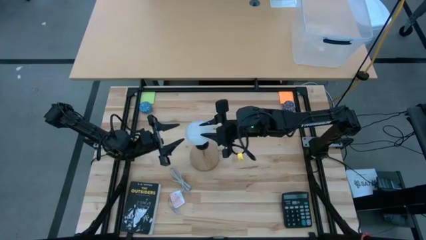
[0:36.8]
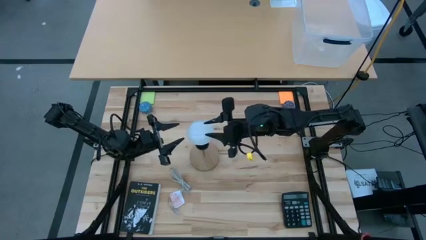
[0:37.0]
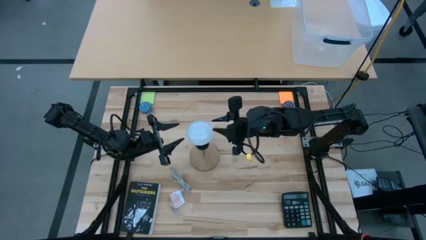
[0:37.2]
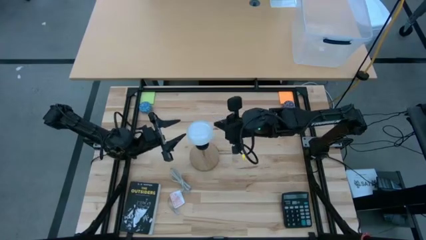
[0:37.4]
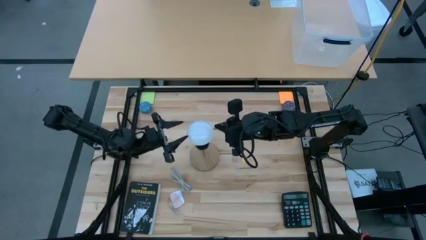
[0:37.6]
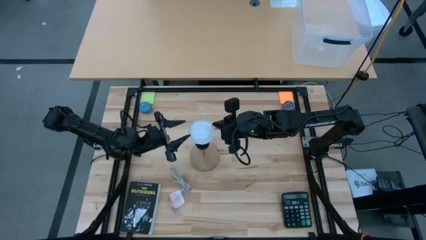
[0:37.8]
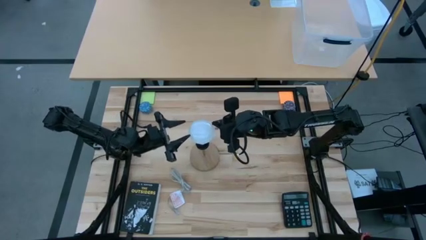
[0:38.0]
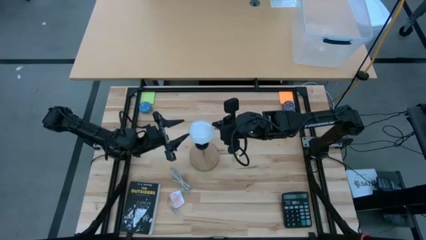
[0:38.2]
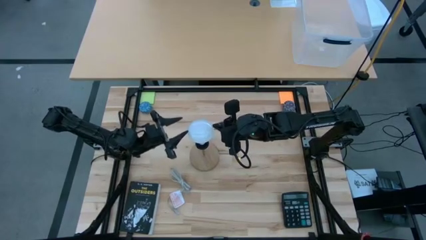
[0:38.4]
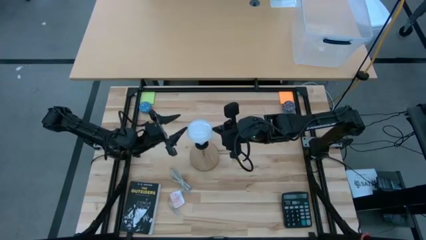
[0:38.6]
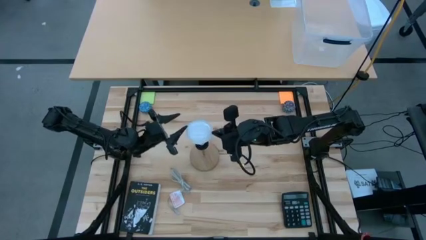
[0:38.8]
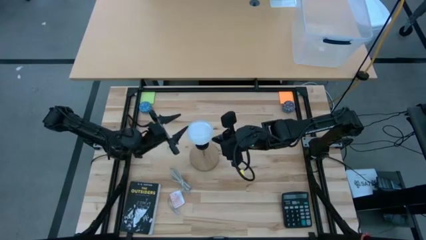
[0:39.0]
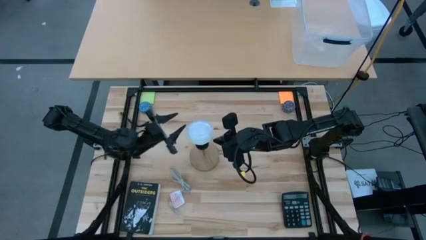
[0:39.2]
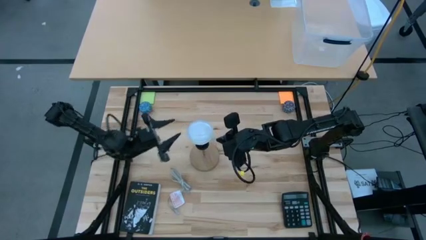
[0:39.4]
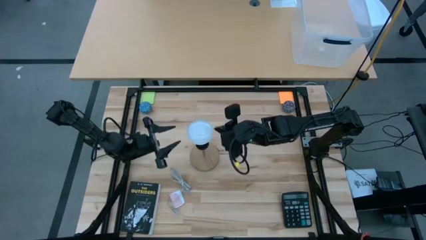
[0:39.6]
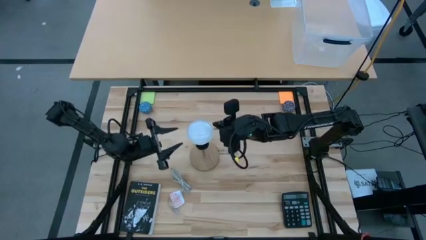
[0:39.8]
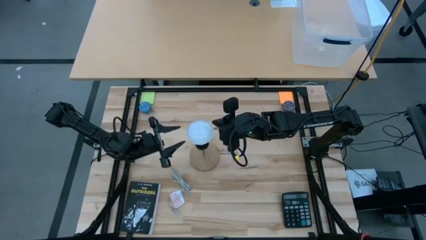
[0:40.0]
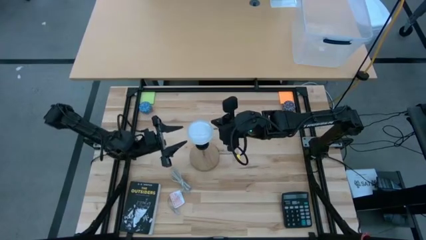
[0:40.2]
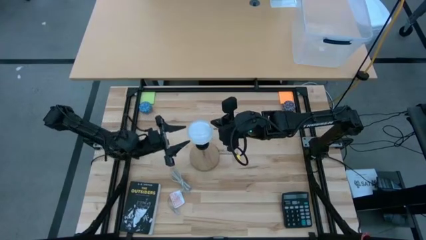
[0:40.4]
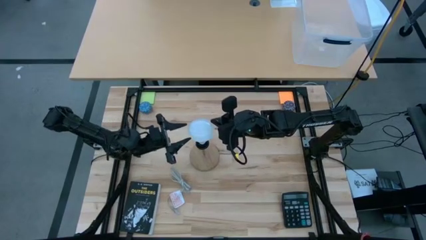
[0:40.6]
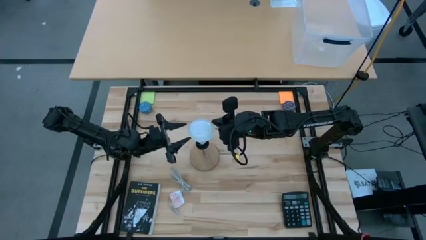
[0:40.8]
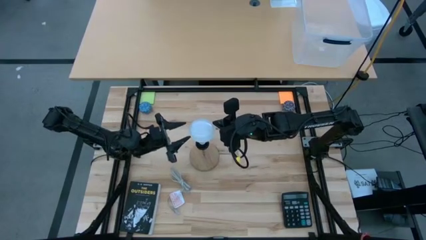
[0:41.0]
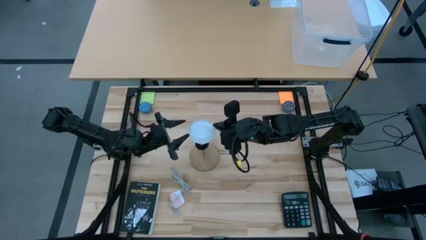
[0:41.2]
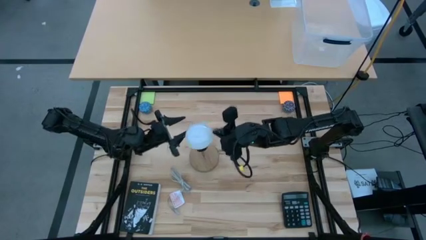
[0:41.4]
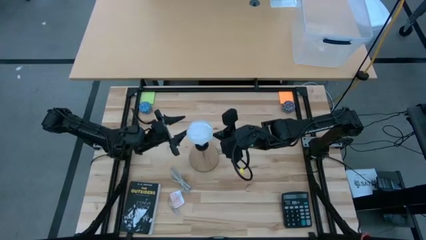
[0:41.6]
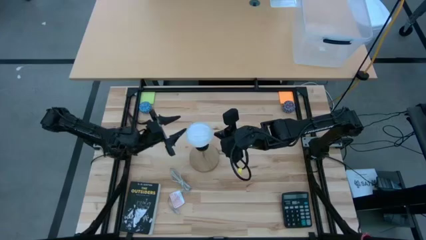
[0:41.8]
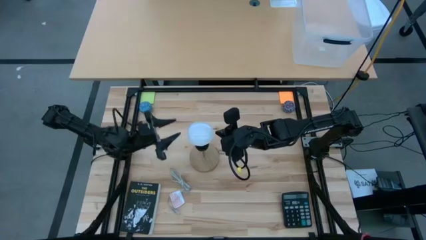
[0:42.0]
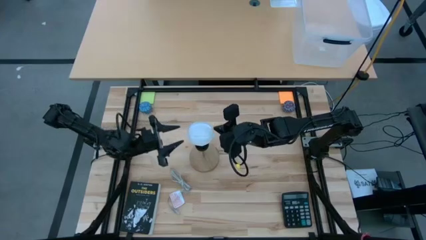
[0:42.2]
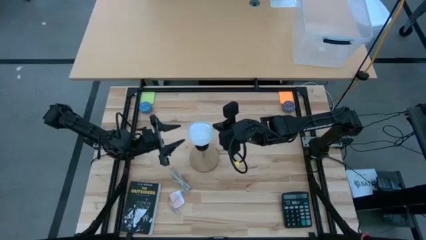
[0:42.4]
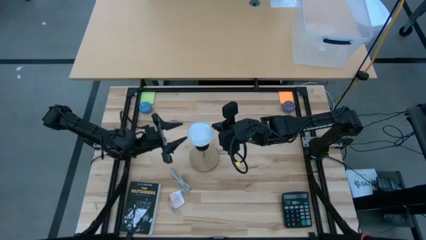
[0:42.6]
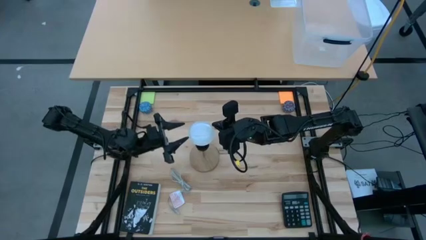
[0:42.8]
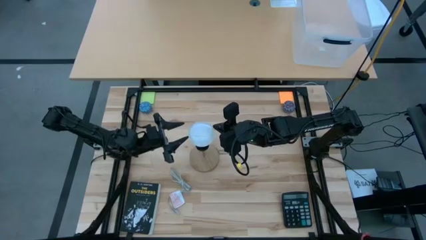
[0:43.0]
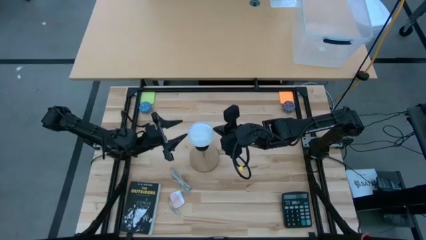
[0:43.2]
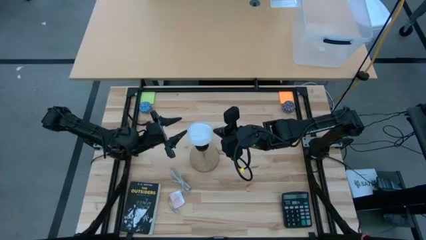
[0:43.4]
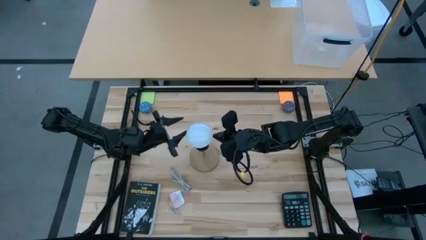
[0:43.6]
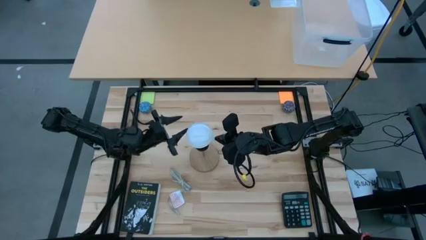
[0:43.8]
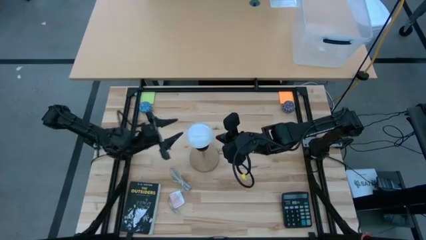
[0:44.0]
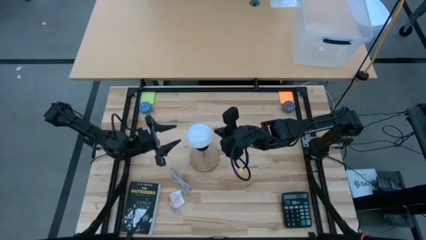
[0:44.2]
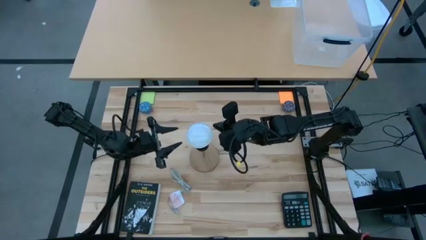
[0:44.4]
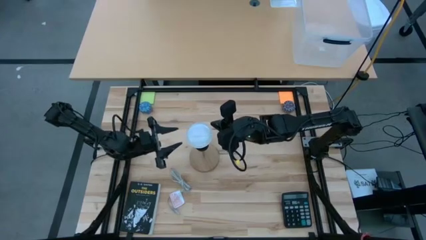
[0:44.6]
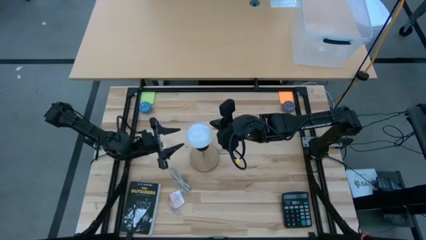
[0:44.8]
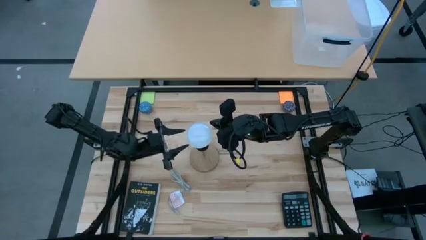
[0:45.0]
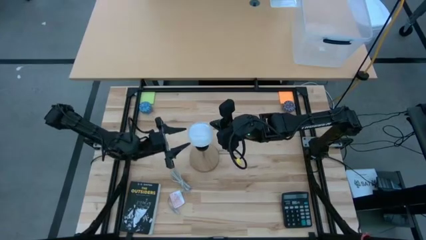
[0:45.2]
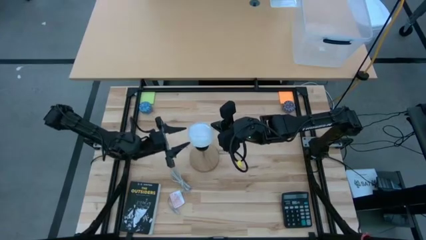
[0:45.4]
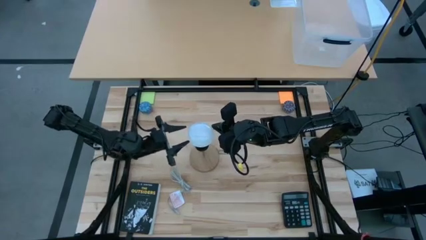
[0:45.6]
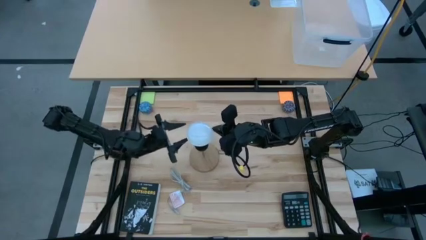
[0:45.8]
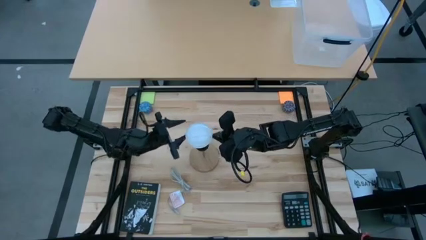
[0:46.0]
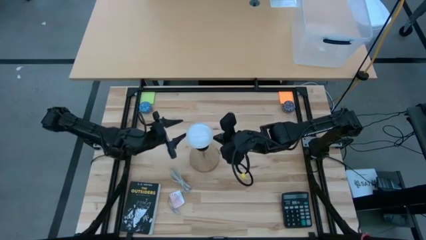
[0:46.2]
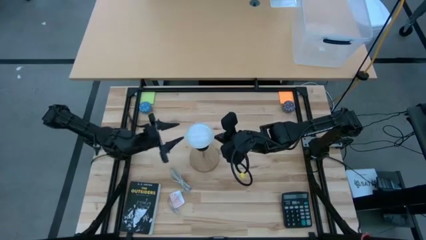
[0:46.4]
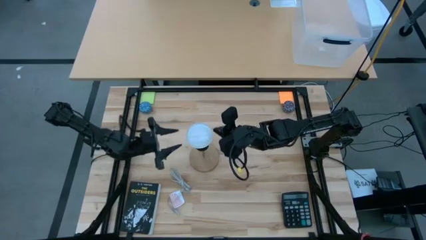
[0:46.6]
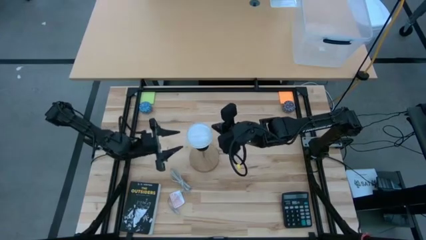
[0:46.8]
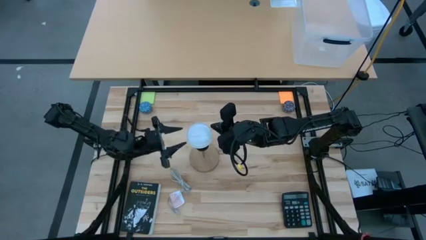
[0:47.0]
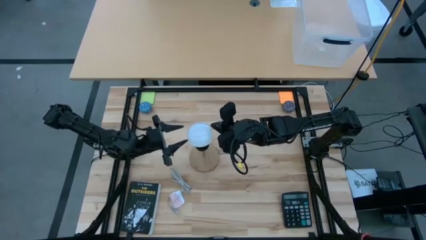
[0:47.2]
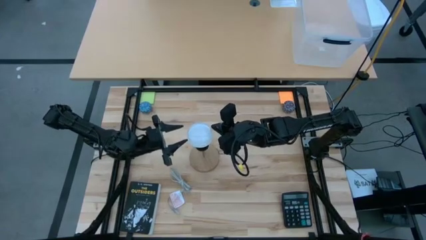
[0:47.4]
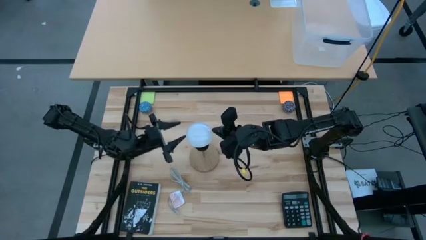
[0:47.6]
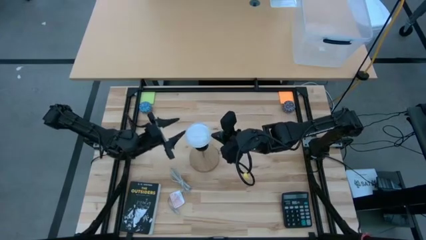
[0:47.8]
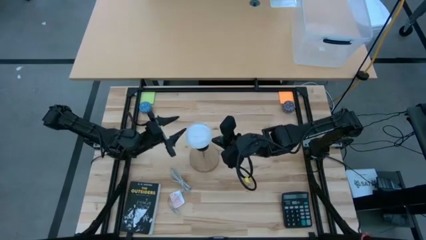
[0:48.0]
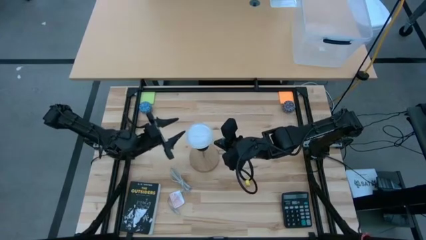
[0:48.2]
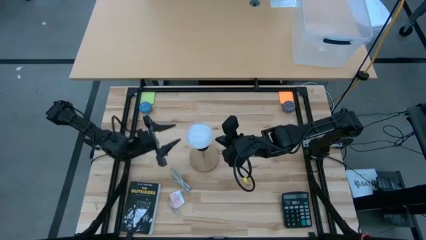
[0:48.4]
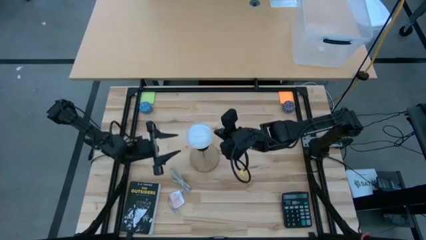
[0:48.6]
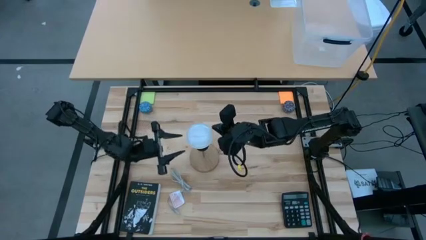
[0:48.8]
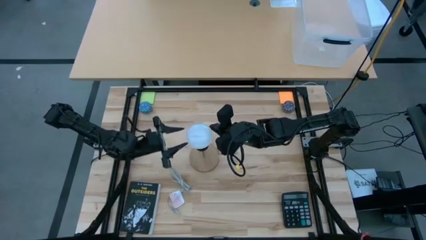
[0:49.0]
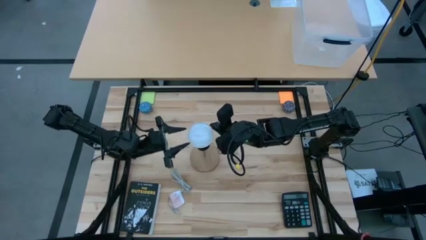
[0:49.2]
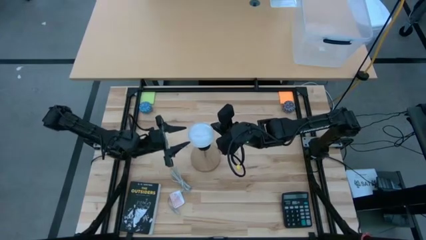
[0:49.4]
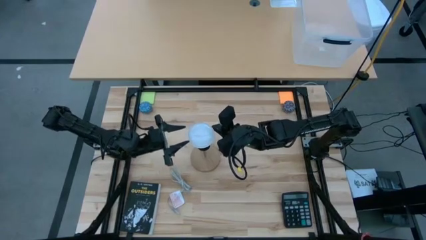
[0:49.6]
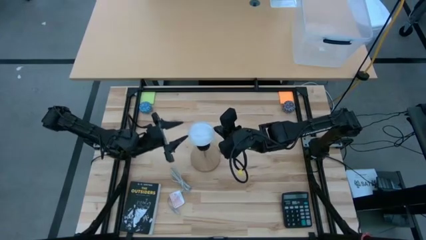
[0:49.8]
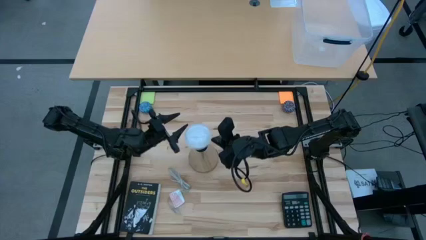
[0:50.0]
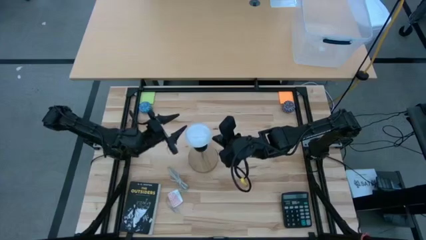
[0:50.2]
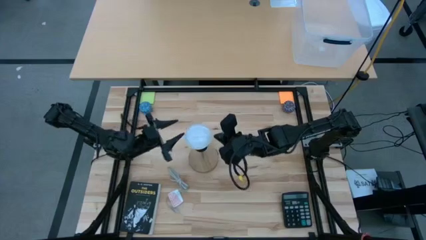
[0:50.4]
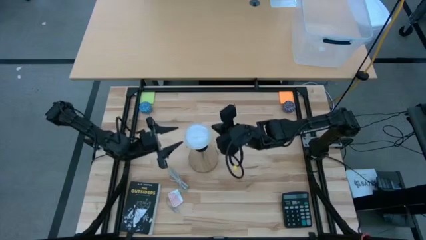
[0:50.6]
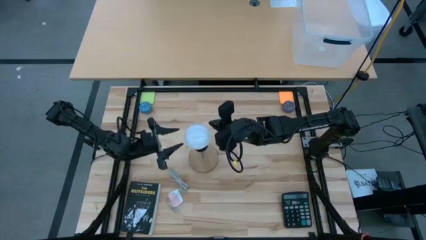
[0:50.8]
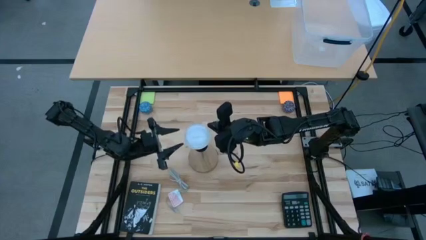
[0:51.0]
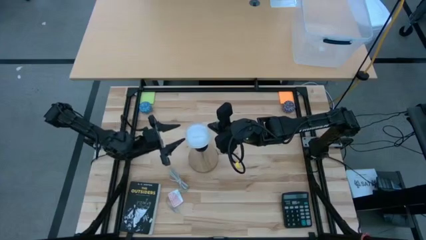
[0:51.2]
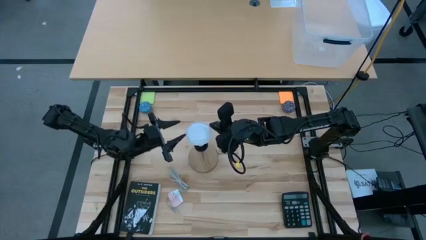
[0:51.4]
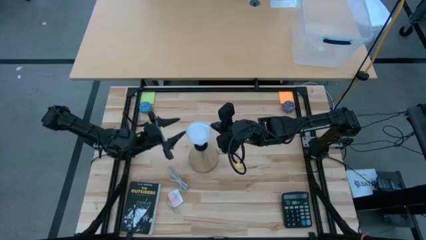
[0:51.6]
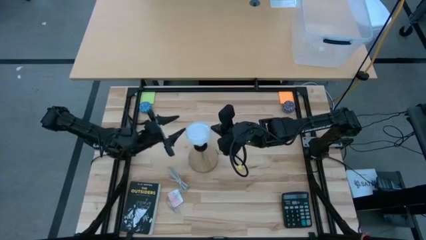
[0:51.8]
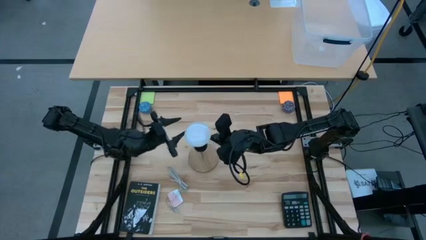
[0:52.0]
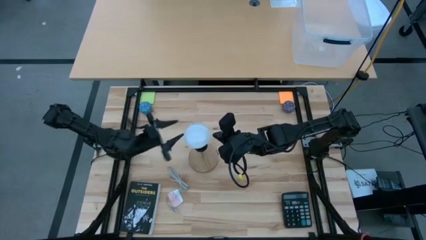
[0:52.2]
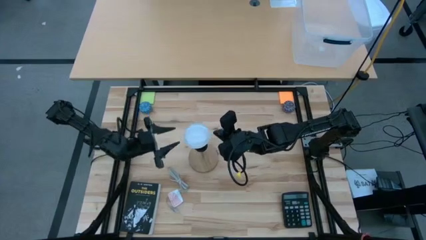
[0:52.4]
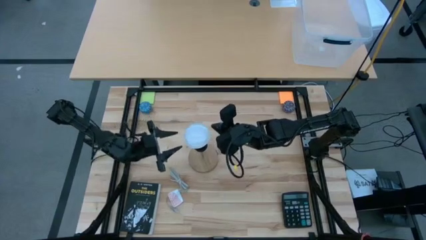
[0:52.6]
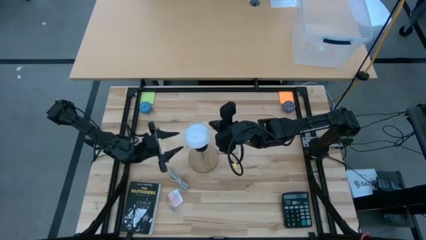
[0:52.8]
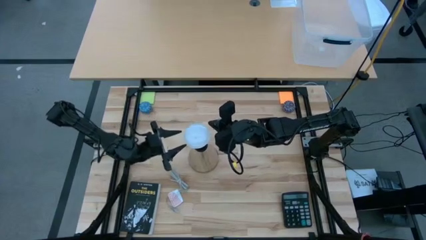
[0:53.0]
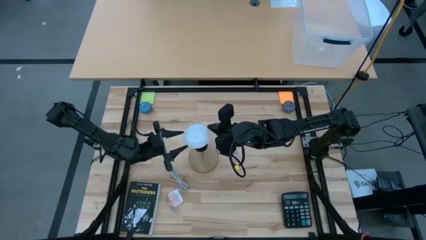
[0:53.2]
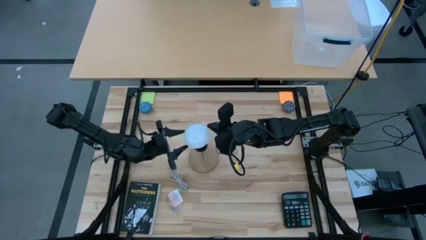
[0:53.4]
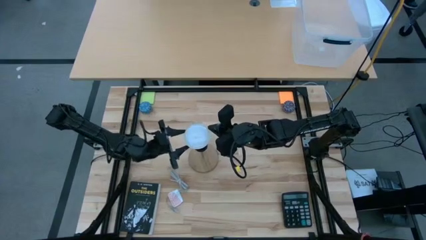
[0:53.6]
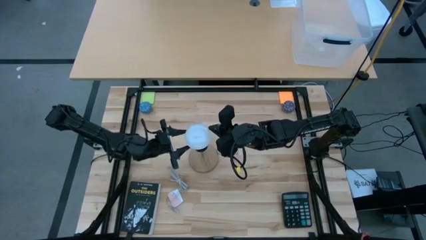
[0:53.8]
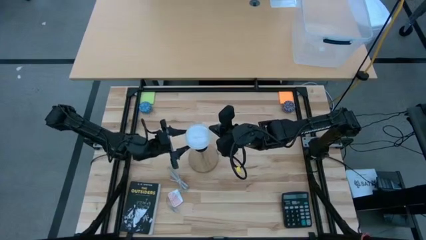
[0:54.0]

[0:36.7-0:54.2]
Task: Screw lightbulb
Insert the lightbulb on the lamp
